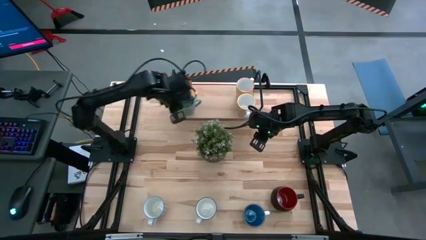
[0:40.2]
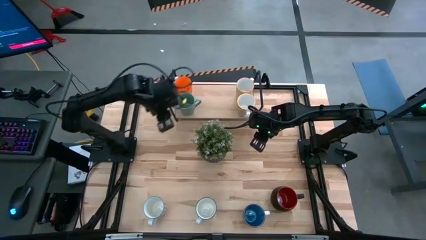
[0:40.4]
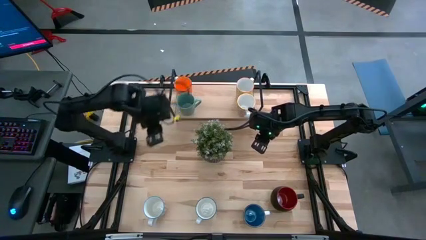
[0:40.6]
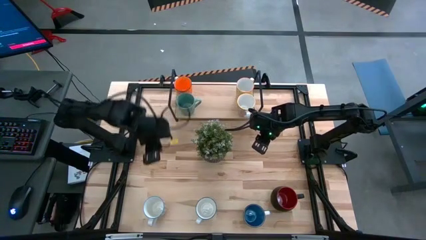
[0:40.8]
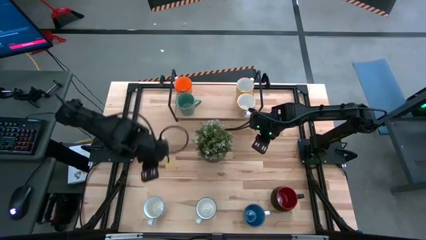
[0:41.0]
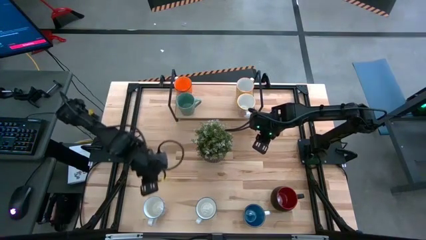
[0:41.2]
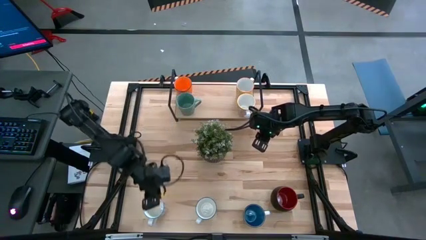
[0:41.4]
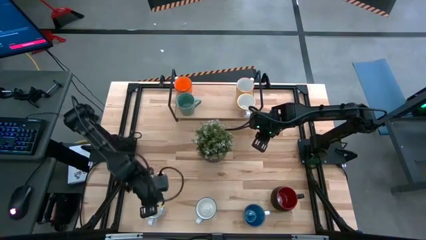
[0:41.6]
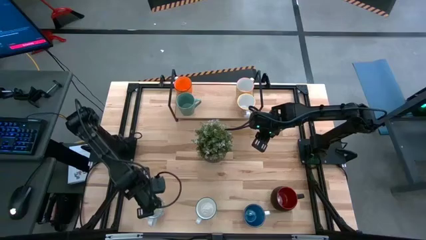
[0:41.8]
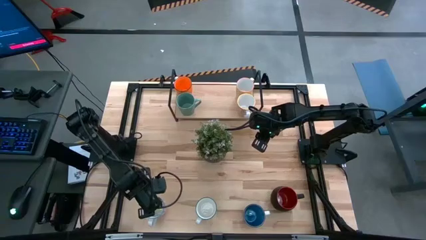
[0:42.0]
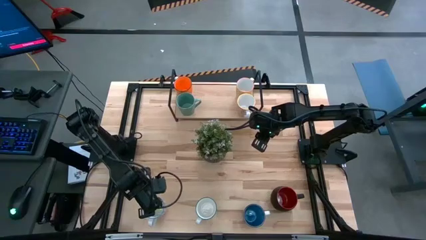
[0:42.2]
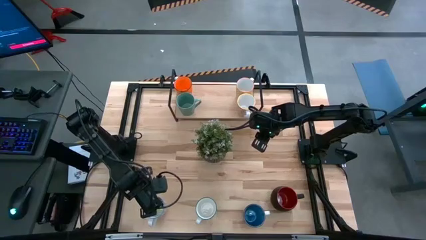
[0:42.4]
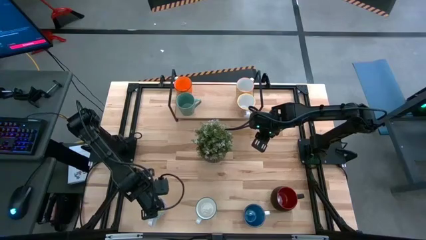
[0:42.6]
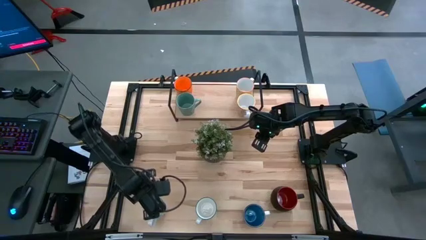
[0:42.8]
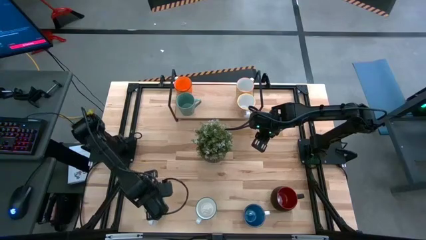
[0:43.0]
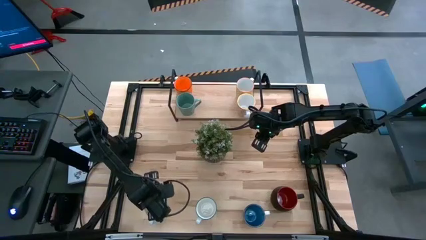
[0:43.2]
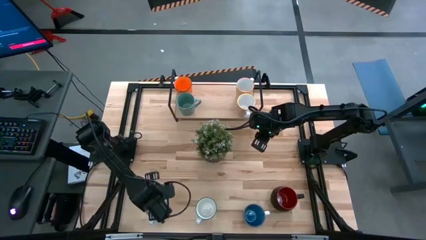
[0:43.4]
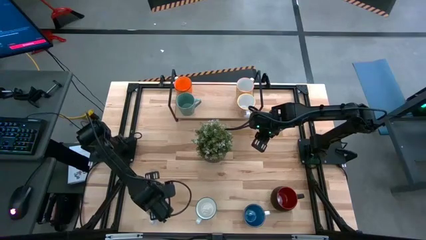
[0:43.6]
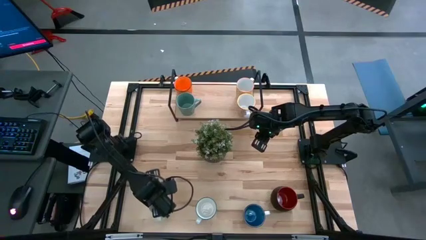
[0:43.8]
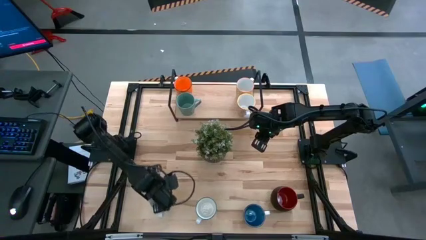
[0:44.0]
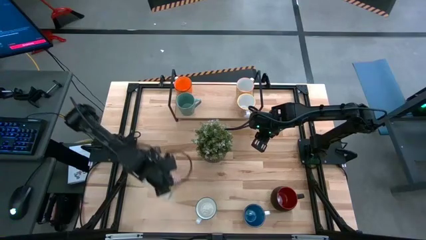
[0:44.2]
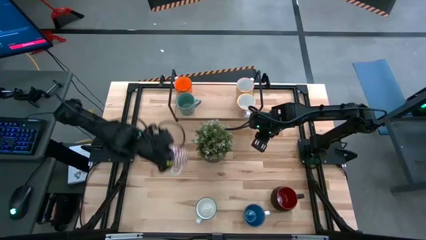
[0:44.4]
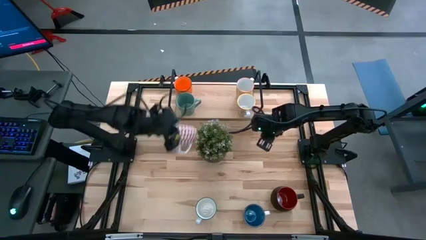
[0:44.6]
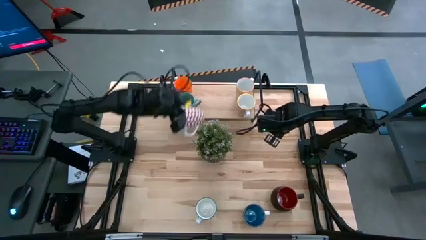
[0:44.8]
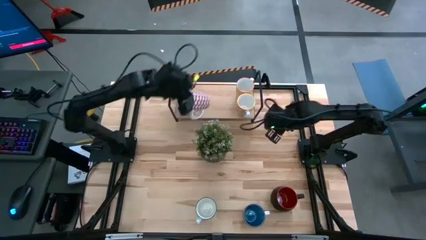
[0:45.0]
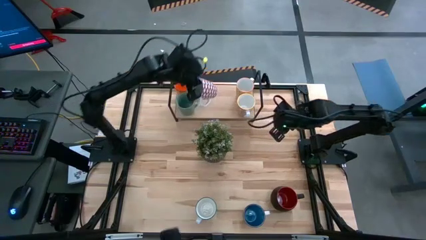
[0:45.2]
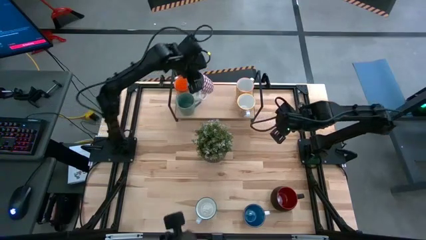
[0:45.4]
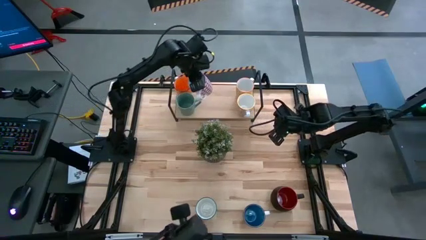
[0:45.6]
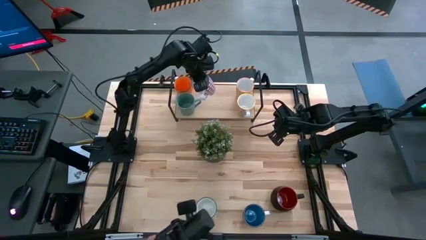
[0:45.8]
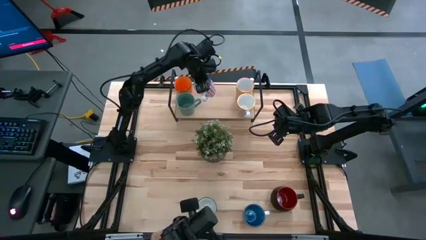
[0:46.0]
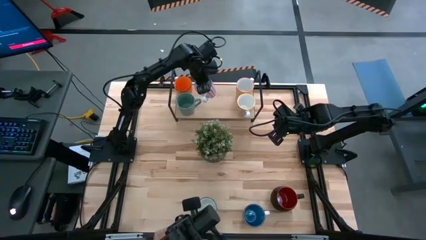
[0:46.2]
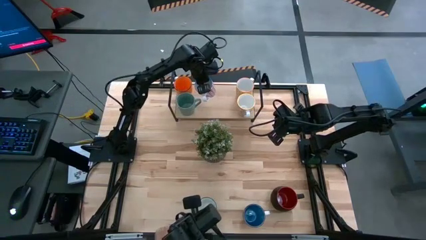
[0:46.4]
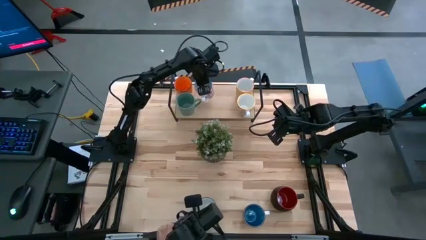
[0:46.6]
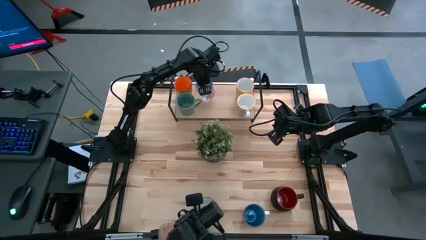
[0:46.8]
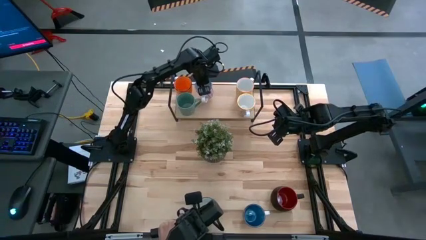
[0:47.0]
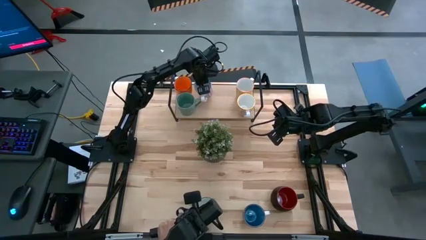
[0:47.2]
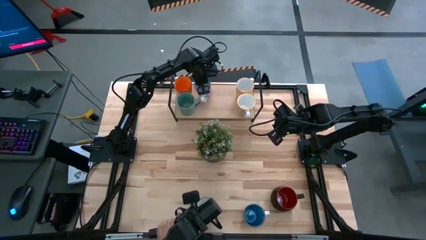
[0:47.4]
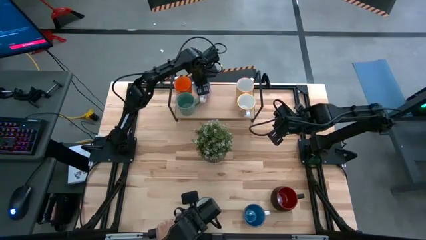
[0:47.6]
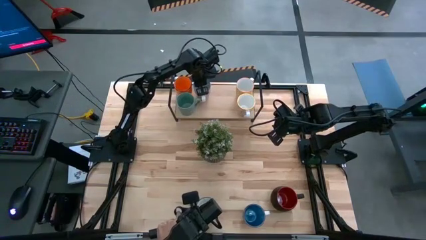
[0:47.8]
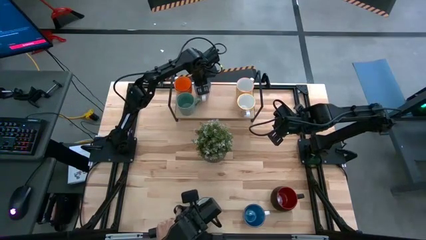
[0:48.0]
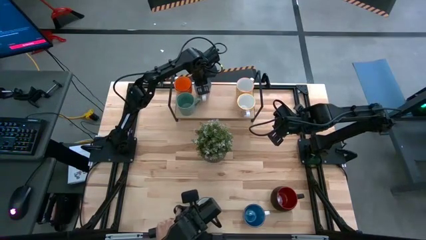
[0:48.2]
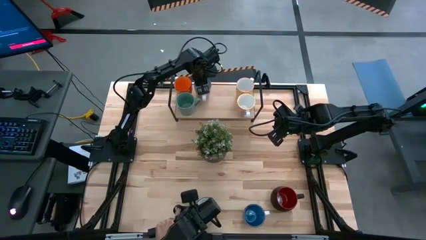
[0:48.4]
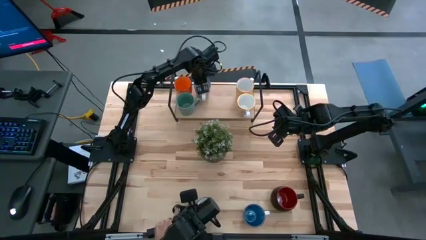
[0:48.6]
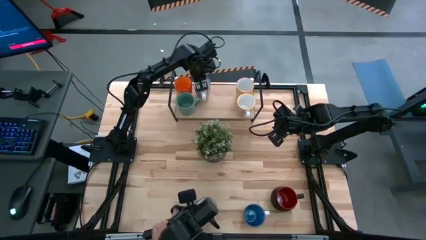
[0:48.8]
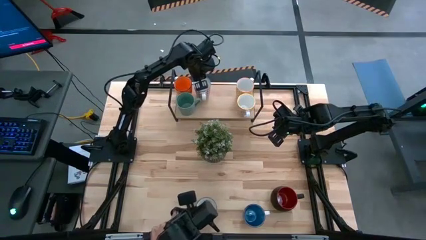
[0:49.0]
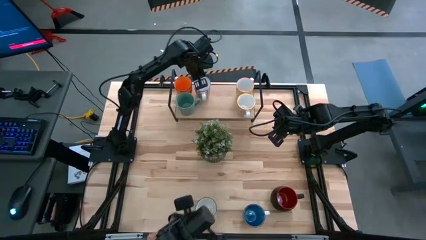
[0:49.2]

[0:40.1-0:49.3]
Task: Place coffee mugs
Put the red mug on the shelf

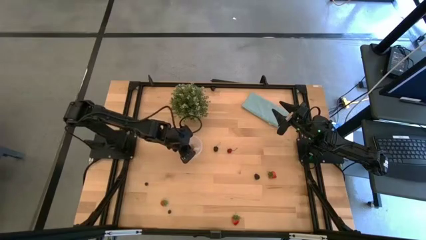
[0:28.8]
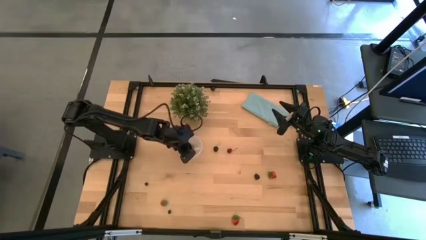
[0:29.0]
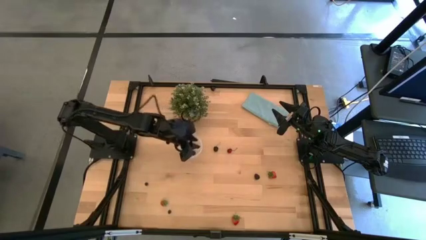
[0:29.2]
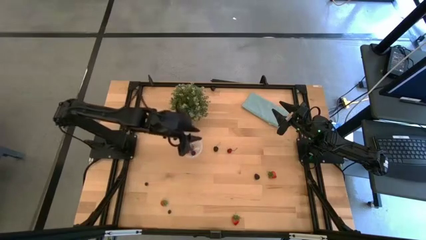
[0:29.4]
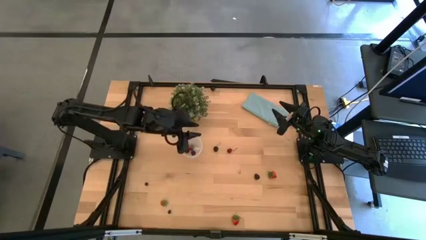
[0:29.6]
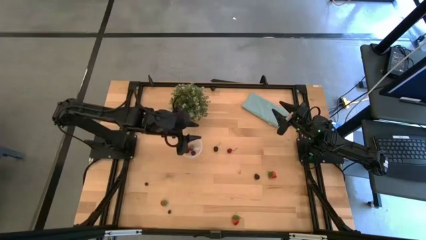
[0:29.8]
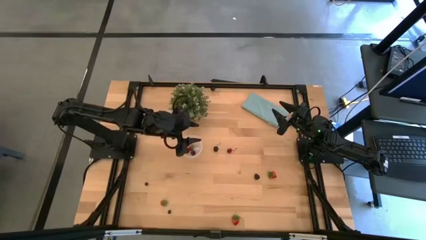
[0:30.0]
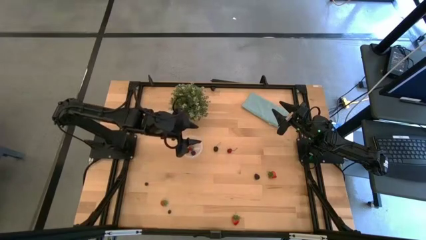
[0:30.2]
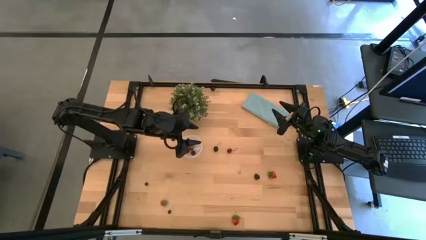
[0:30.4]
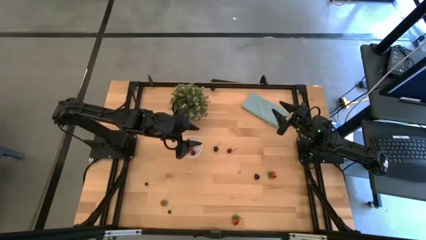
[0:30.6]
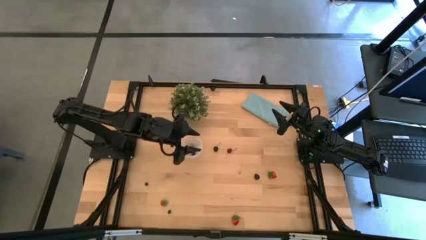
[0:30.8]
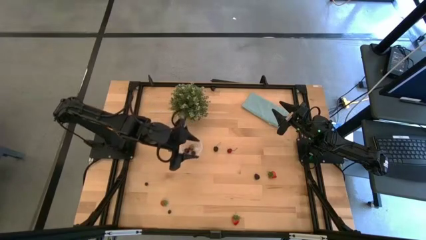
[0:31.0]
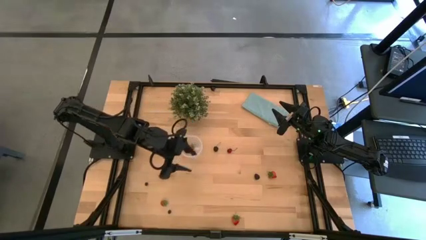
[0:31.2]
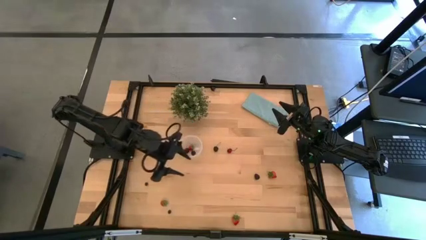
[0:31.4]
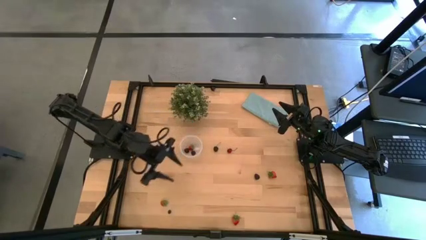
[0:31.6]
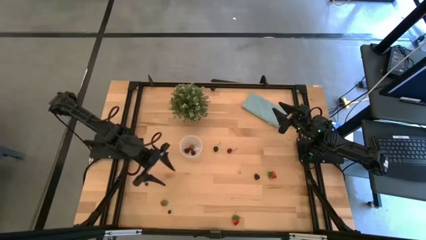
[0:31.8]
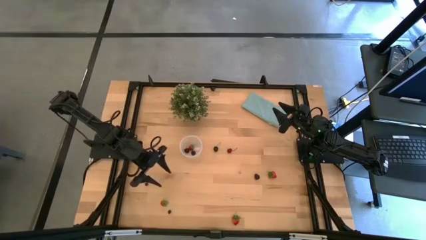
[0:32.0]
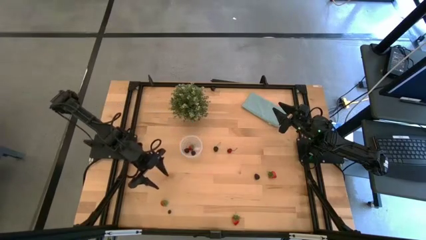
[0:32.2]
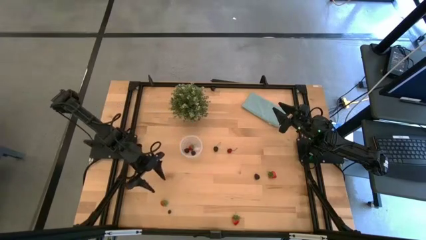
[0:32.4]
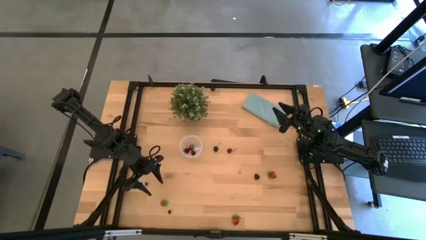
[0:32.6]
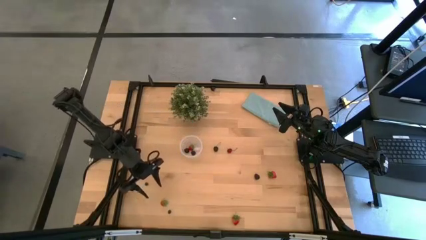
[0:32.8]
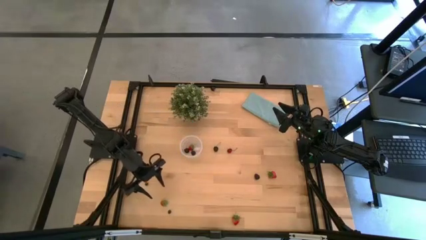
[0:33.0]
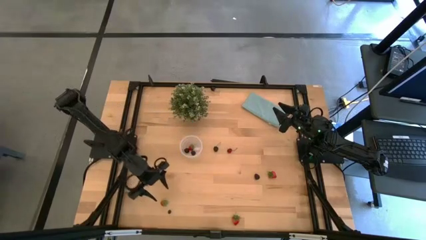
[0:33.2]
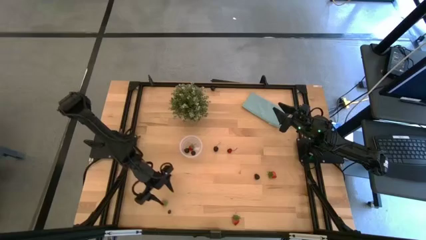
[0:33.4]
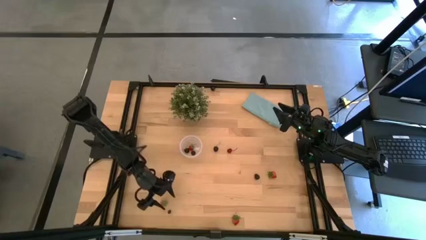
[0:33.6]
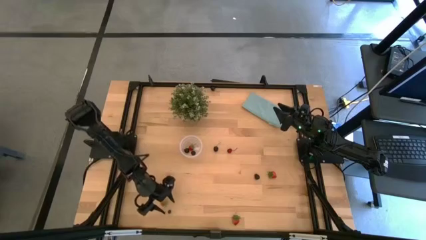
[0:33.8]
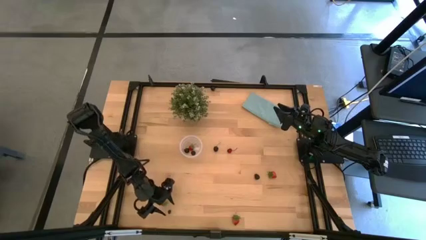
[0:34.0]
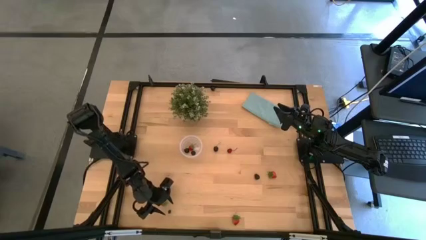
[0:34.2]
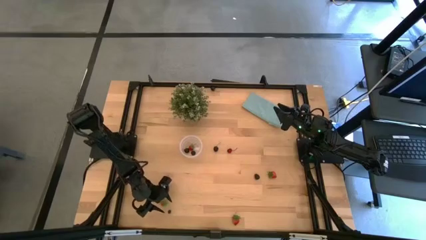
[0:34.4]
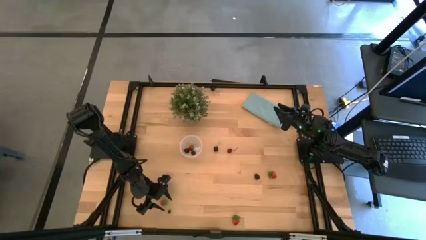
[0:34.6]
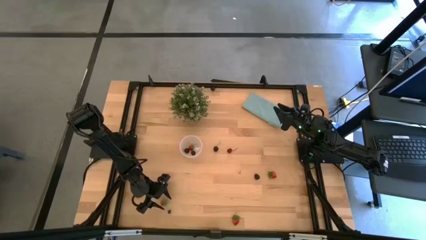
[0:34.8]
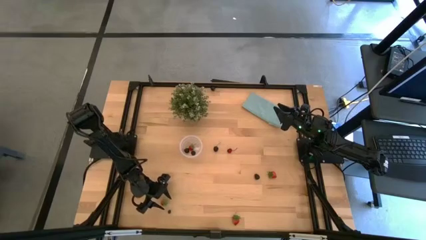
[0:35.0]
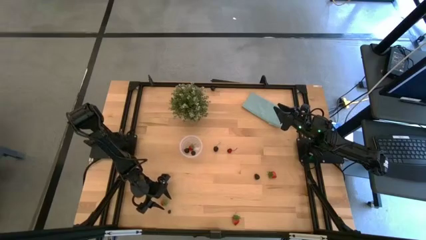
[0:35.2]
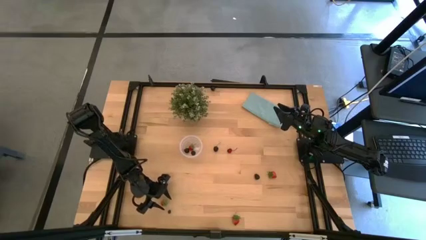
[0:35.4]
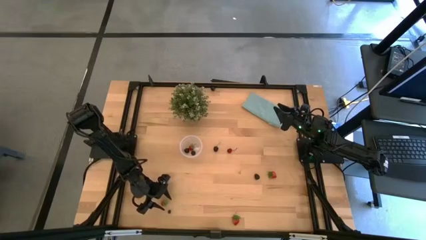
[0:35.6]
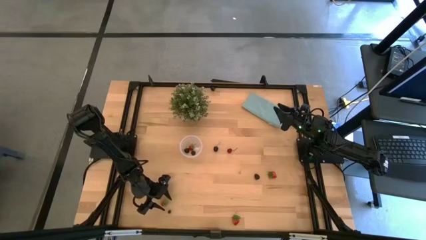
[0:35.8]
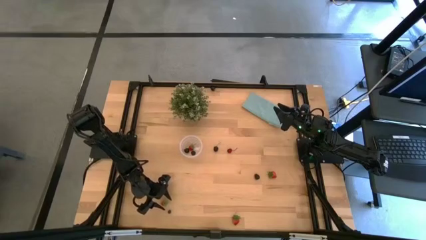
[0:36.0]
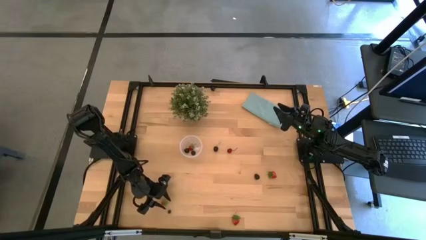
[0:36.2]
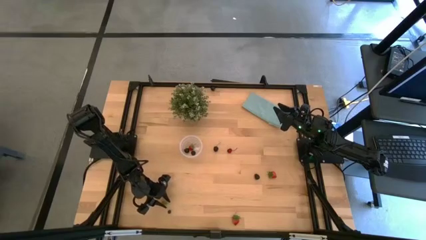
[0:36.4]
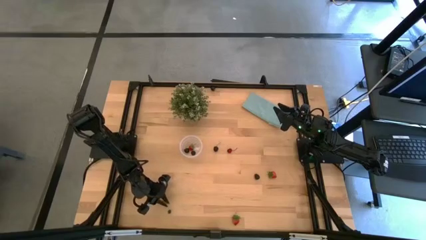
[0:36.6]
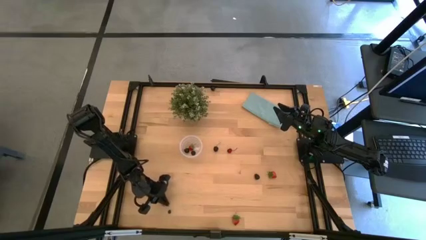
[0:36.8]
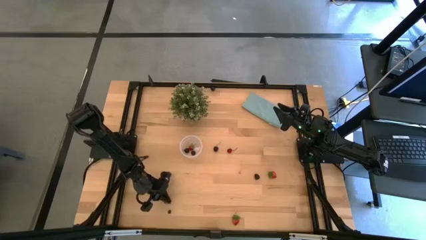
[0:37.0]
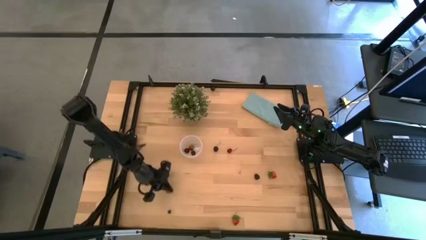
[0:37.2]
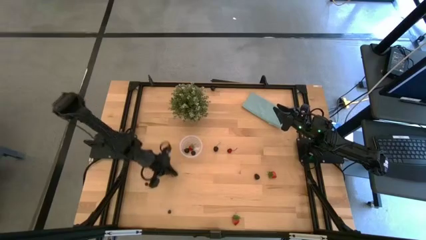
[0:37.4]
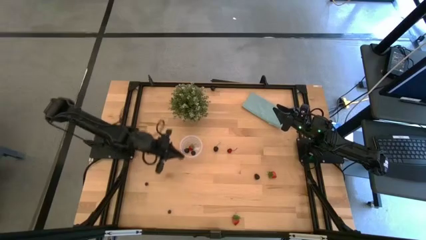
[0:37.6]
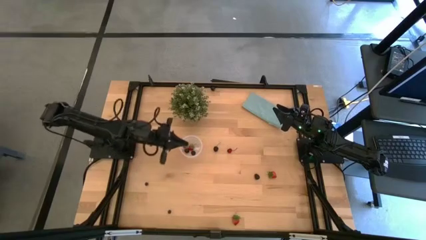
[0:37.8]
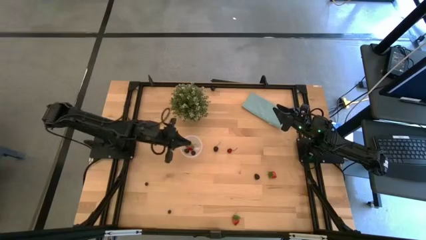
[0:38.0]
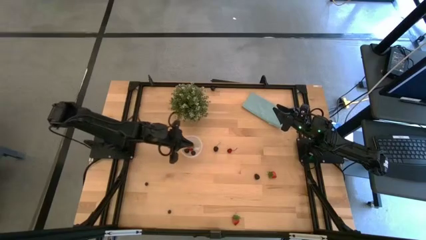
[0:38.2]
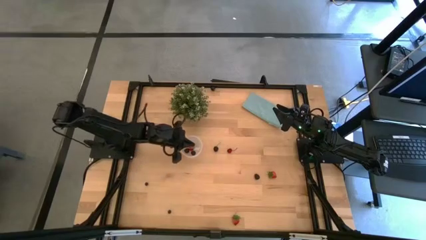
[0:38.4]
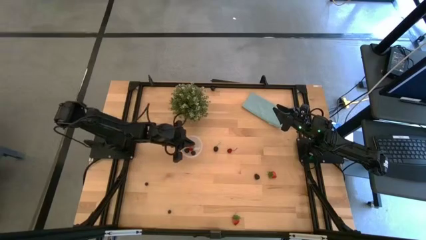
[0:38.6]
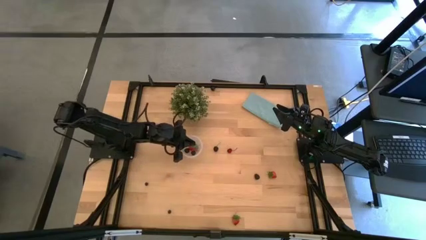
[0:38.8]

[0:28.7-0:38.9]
Task: Pick and placing Produce into tupperware
Put the red strawberry into the transparent container
